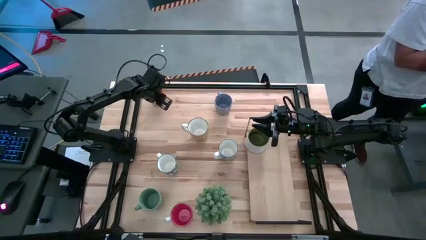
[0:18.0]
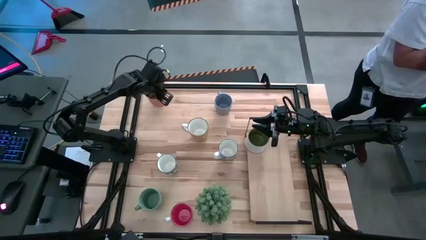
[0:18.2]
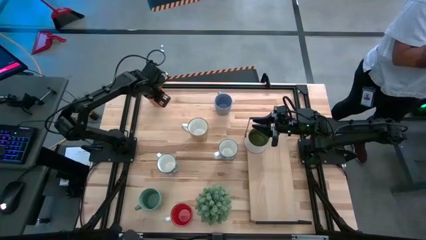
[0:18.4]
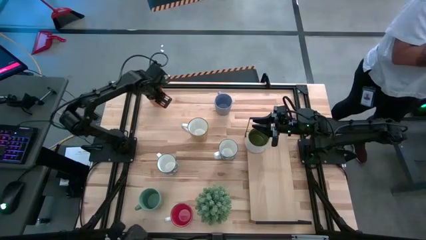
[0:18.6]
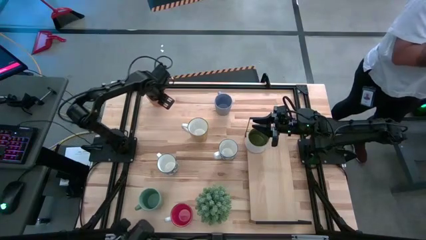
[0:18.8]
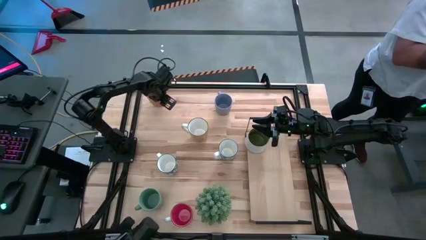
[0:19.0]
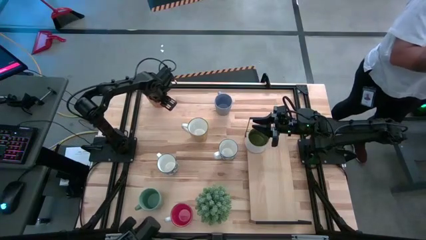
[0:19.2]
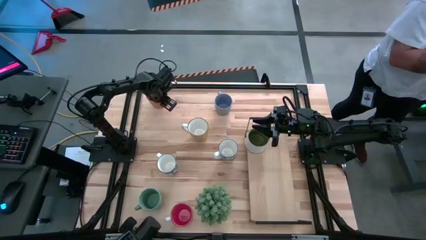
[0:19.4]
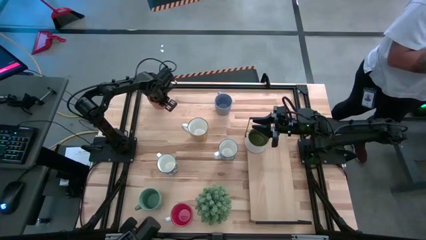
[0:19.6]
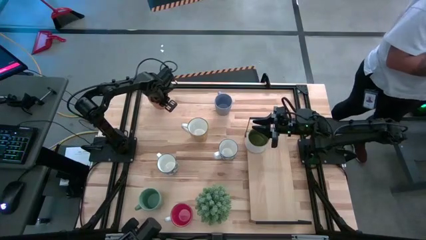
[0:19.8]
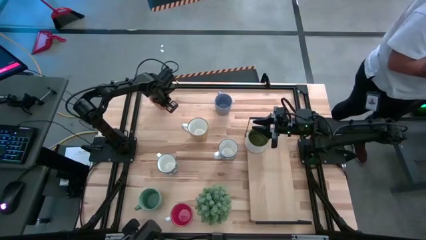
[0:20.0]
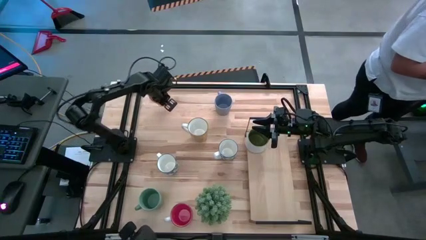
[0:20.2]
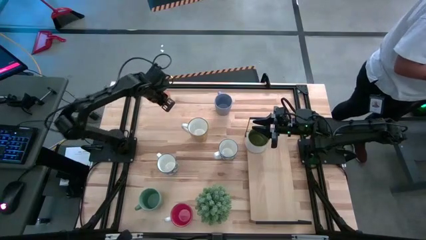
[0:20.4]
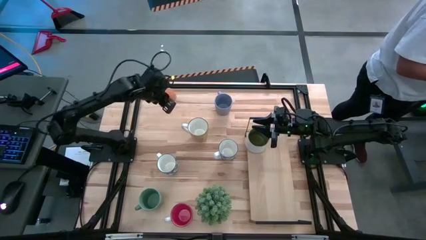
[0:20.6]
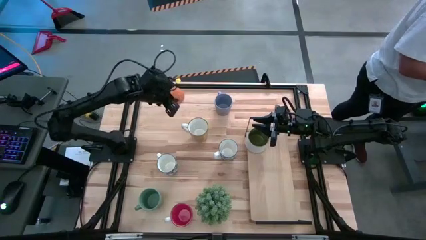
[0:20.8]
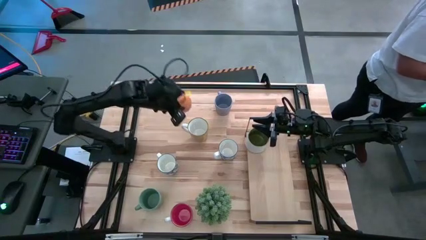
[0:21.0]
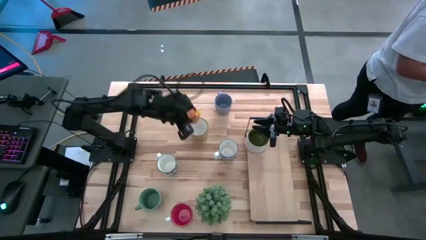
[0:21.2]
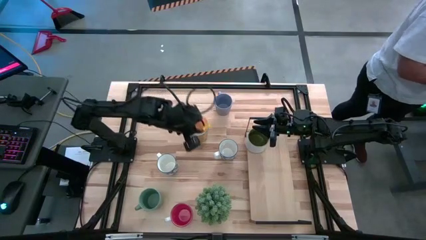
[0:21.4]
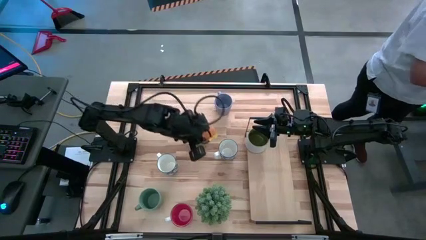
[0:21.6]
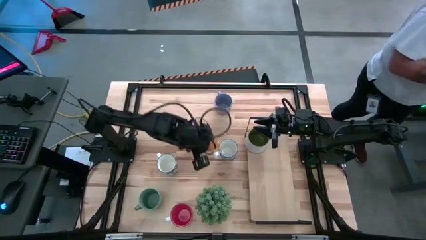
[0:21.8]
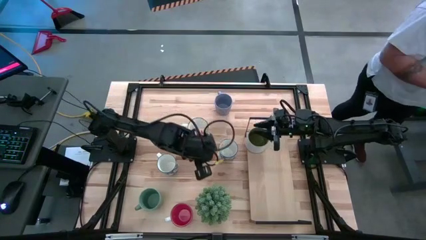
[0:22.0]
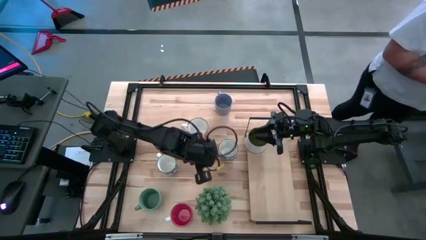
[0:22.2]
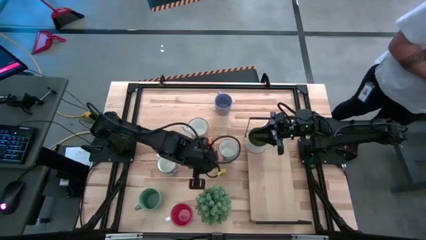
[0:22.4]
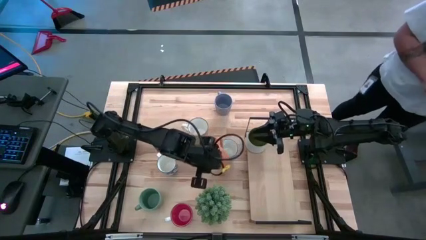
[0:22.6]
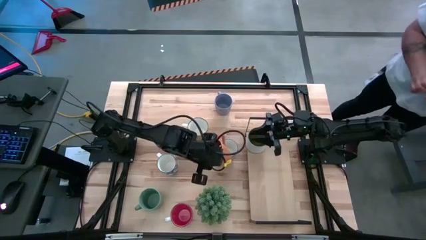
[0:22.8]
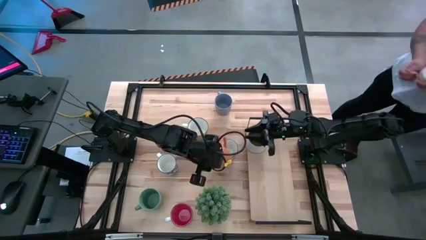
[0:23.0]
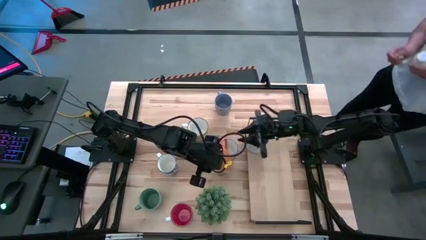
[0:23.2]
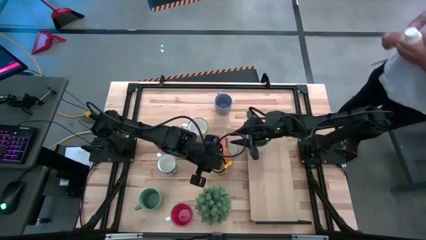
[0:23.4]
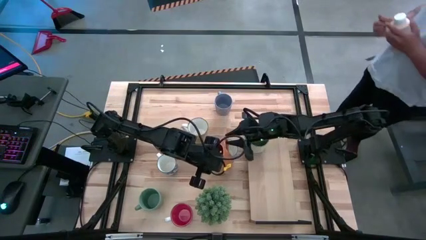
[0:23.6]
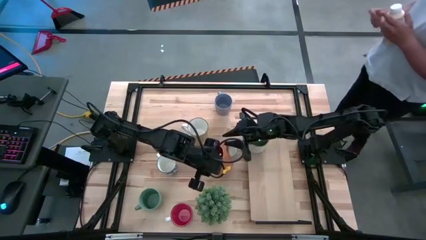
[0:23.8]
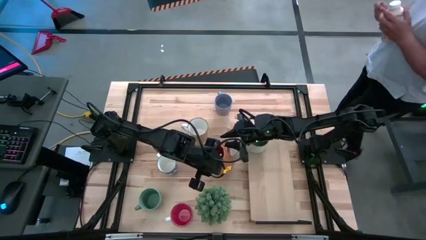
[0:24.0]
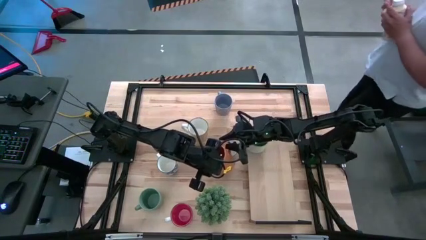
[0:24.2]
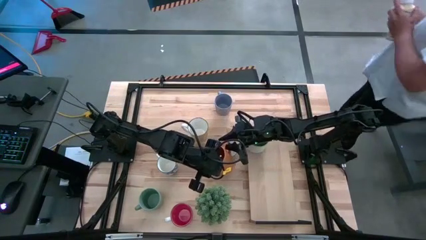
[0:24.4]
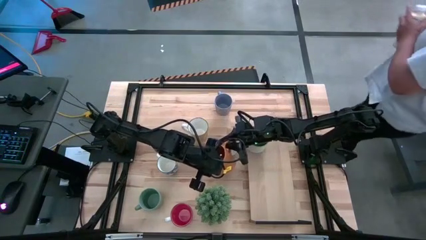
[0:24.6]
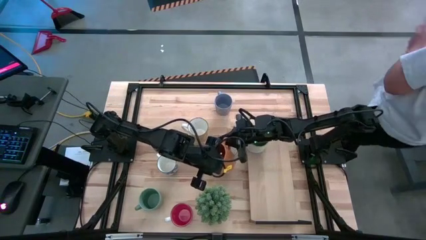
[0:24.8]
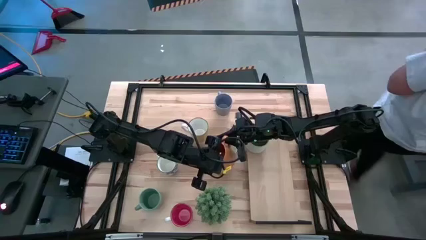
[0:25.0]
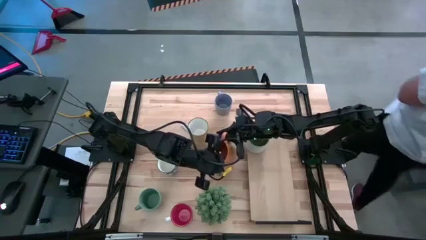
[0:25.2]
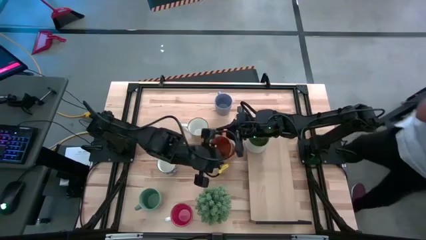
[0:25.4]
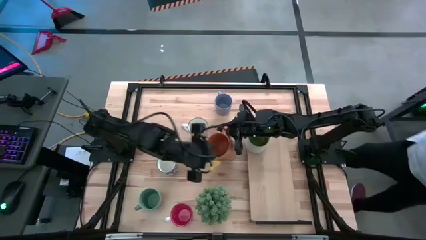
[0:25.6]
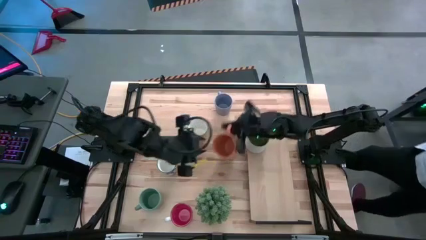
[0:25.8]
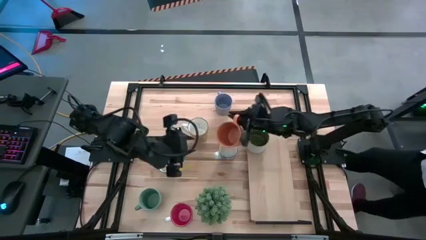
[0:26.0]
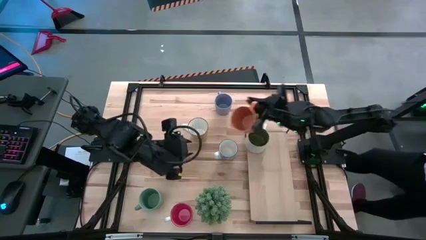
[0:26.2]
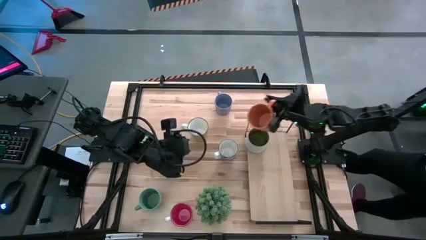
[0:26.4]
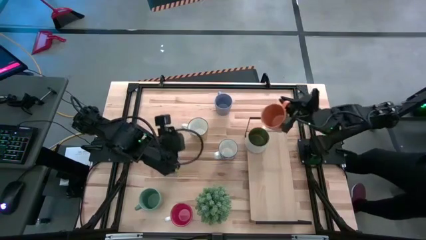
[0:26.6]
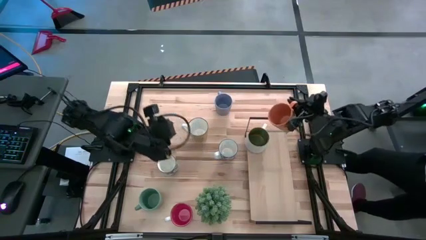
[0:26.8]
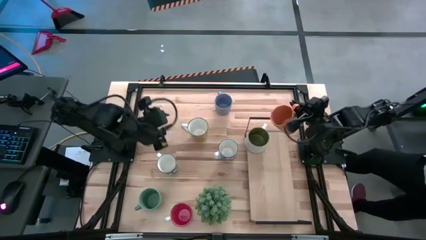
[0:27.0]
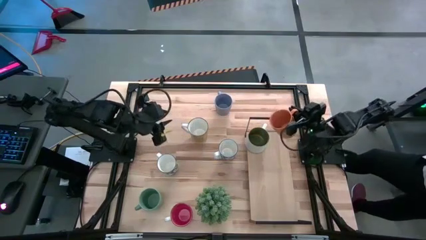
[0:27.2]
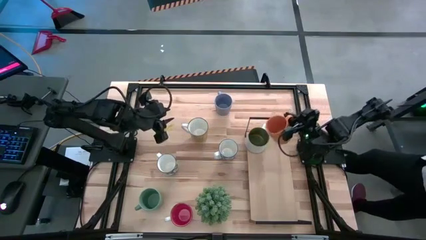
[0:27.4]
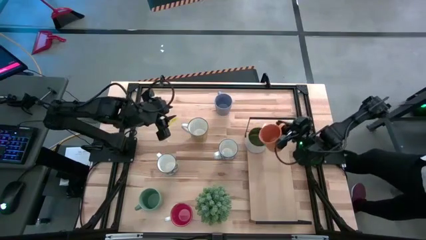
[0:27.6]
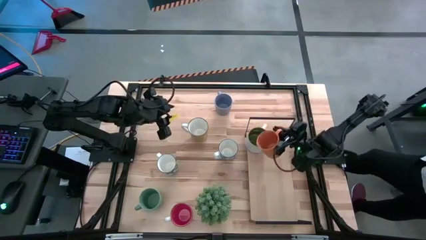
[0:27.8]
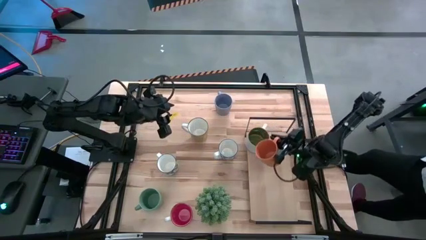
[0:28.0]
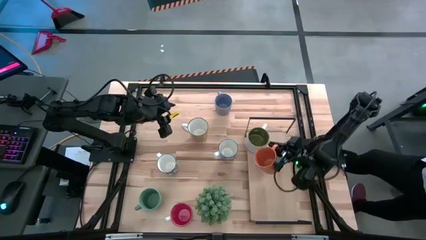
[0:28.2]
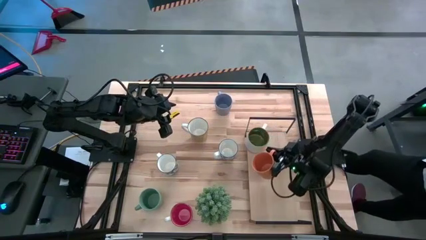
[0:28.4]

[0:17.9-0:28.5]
Task: Place coffee mugs
Put the orange mug on the shelf
